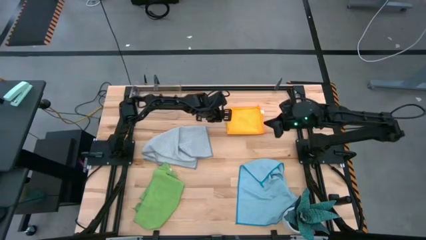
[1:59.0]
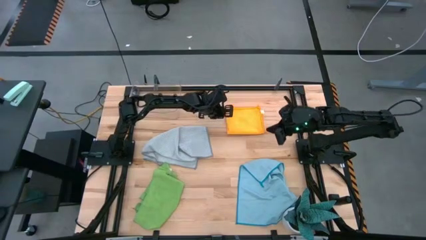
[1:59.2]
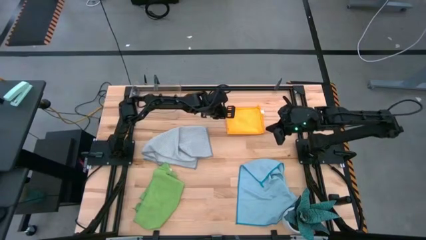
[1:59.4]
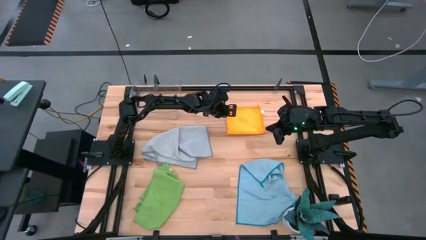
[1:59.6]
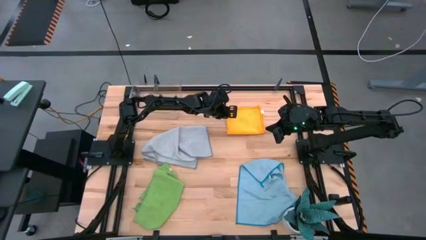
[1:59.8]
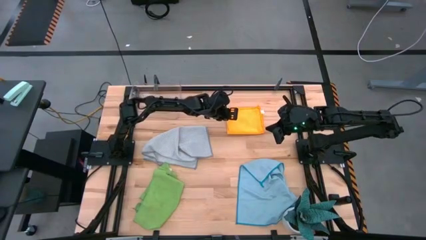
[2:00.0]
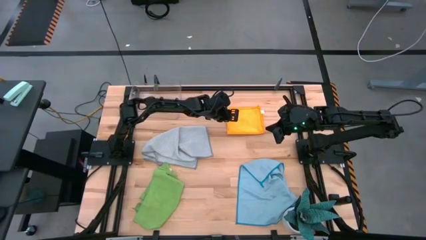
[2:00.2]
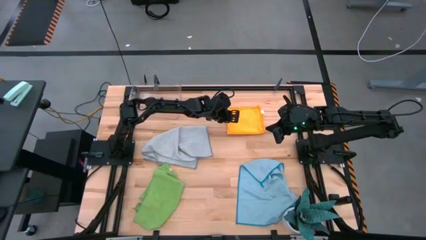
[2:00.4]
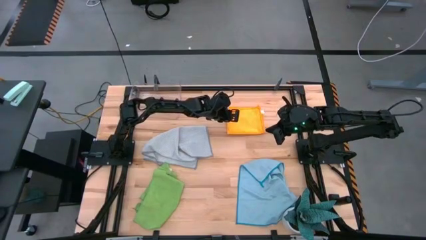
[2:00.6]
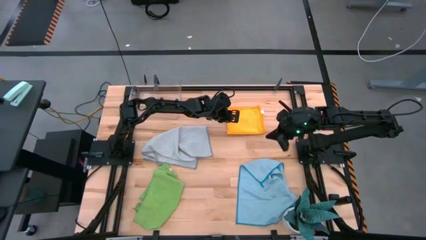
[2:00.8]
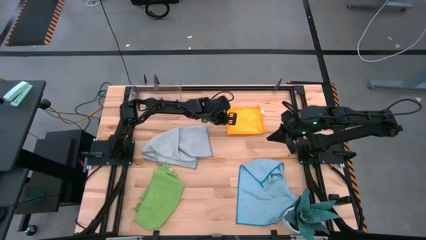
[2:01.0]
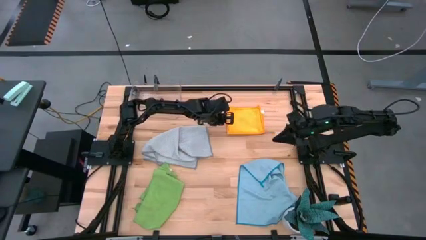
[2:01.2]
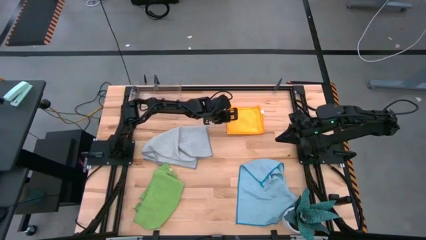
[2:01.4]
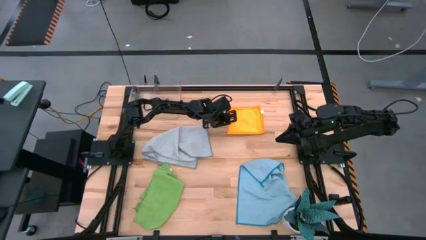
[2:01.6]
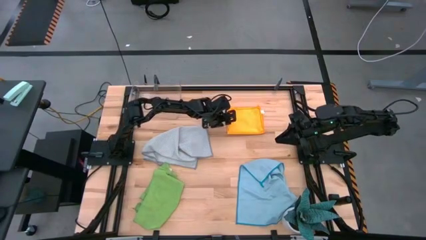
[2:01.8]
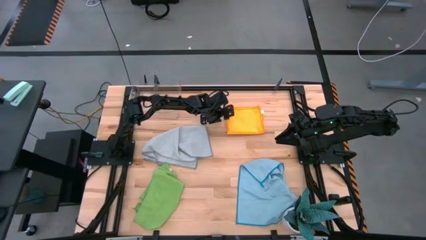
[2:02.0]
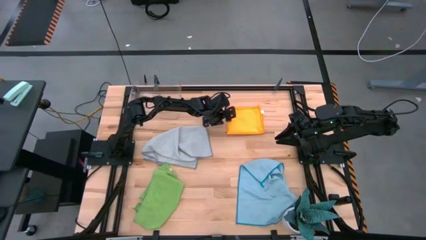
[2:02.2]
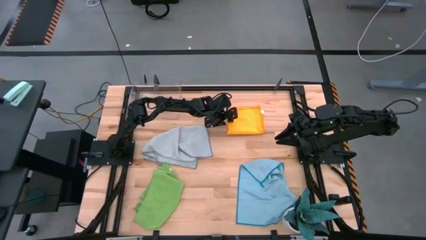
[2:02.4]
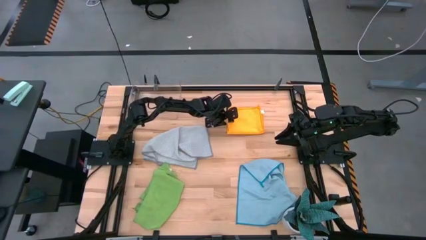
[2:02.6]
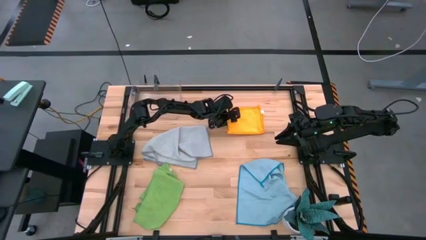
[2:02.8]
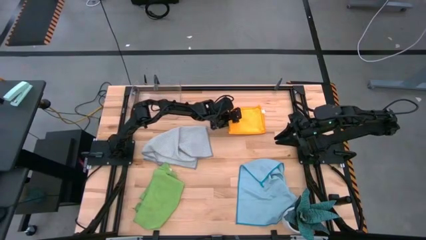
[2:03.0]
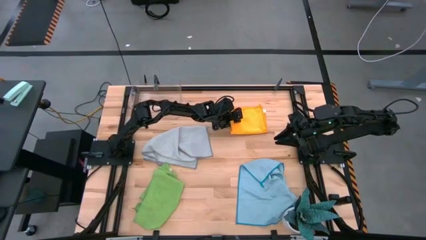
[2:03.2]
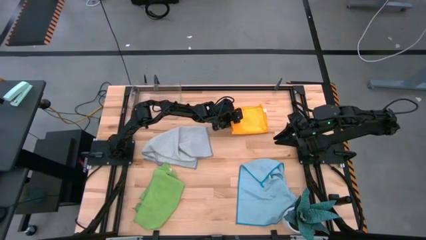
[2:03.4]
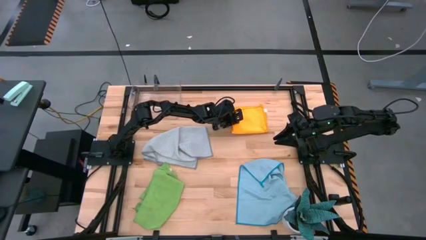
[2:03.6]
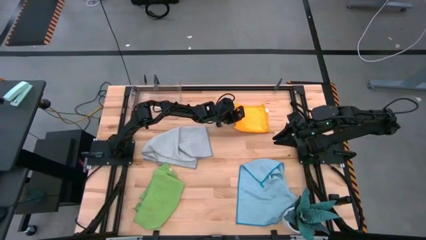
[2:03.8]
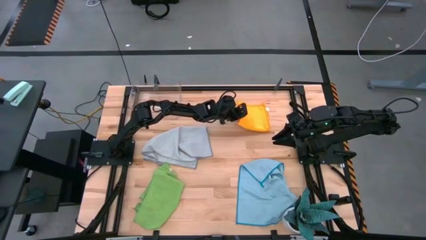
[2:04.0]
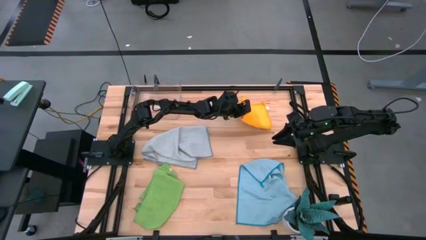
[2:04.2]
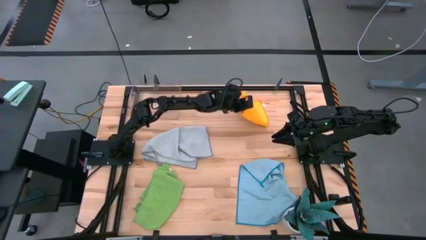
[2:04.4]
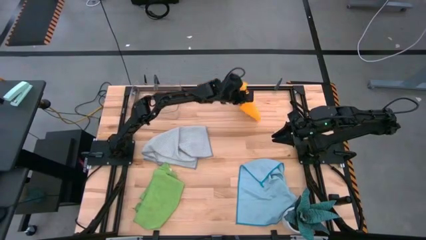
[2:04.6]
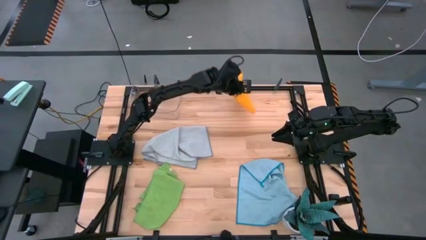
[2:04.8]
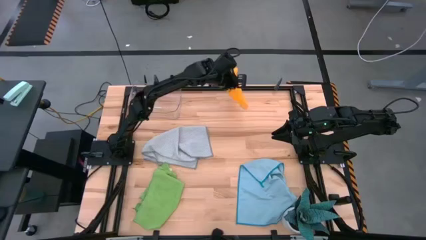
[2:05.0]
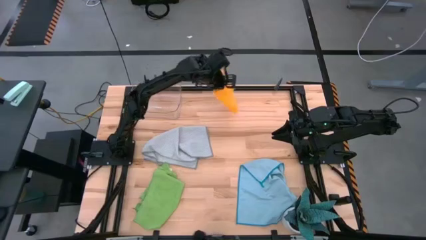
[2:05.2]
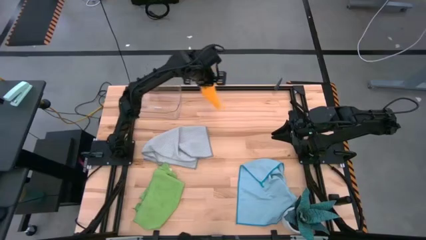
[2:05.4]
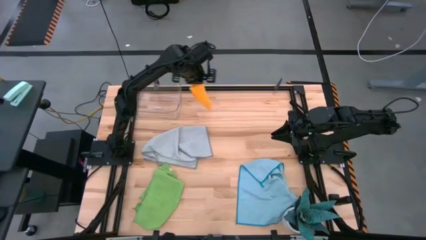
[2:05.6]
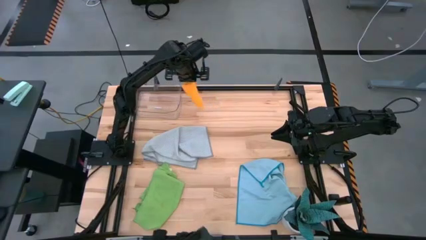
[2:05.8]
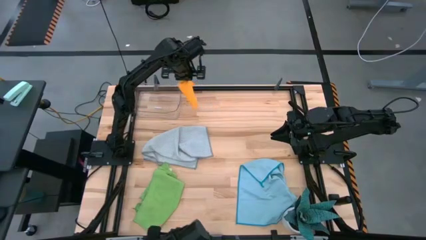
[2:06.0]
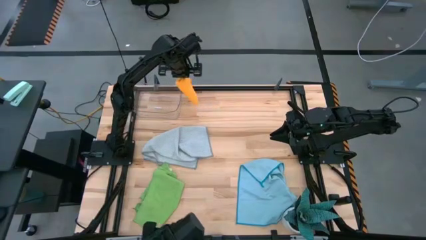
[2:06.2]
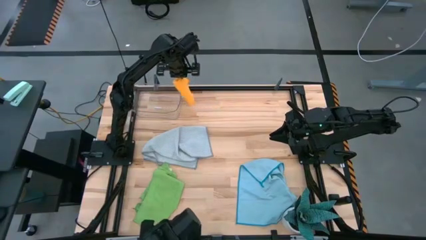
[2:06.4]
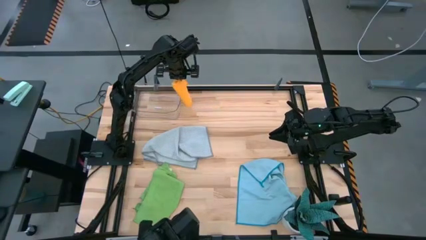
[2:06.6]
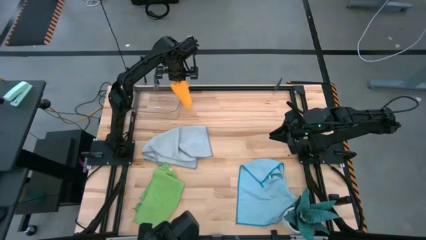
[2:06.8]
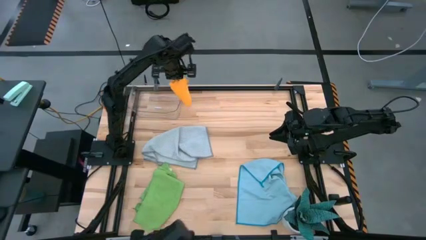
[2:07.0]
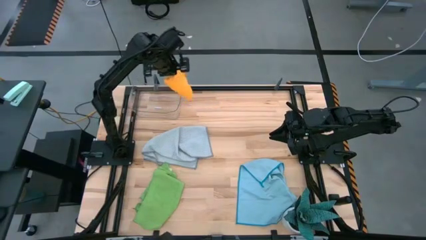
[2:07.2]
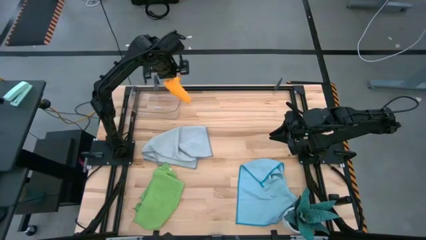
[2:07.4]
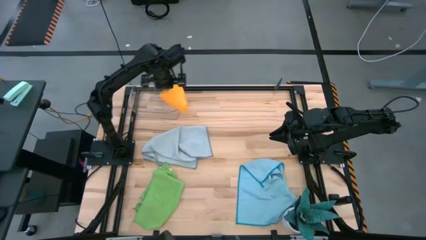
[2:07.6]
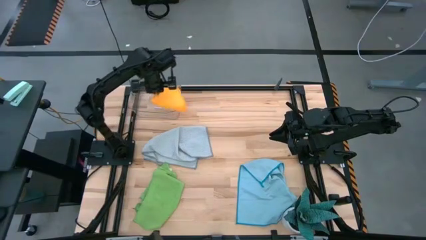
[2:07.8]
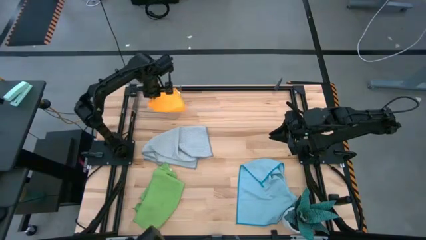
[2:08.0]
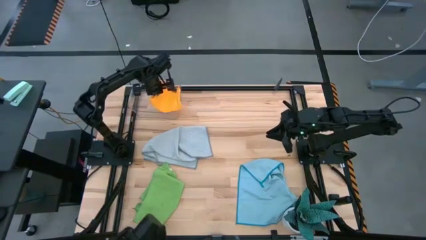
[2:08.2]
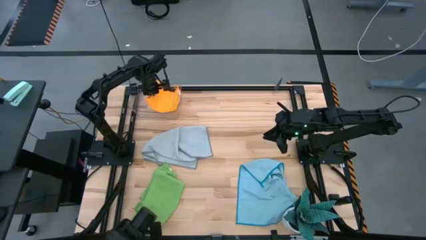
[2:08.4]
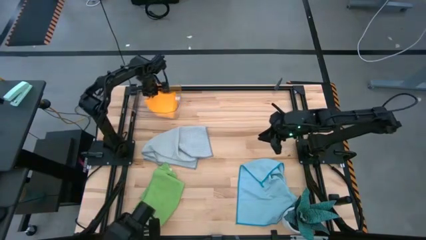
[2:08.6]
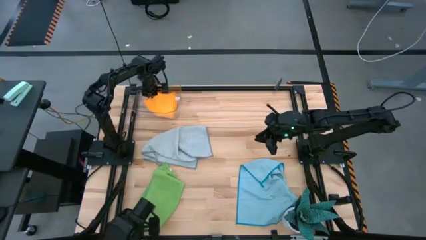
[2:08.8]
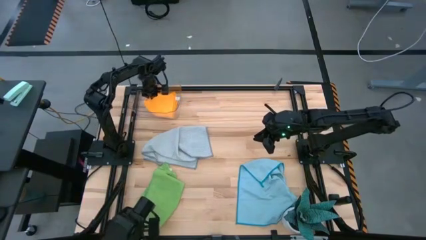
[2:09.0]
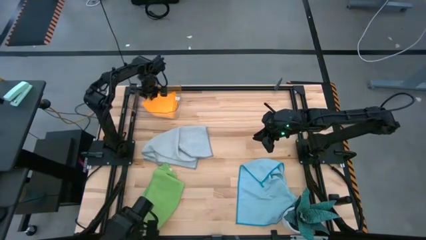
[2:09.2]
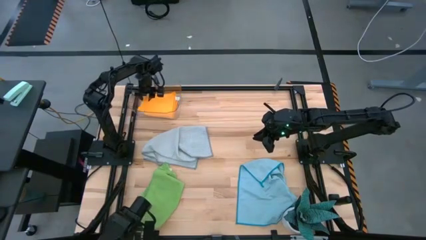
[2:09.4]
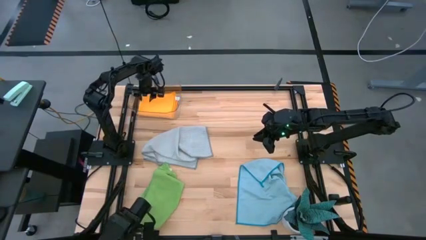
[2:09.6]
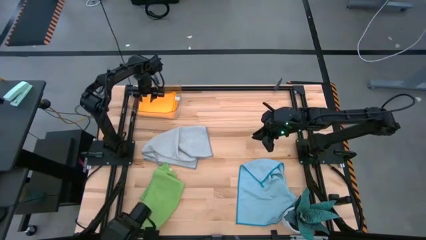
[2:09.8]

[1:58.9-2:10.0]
Task: Fold microfiber towels
Put the orange microfiber cloth into the transparent bin

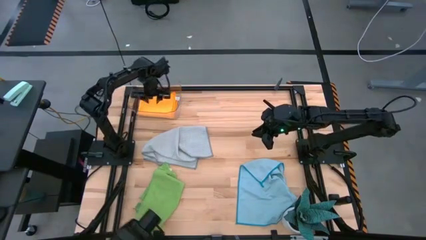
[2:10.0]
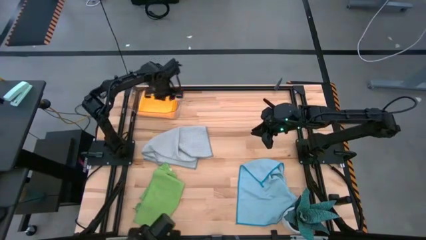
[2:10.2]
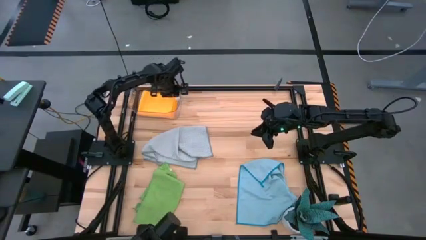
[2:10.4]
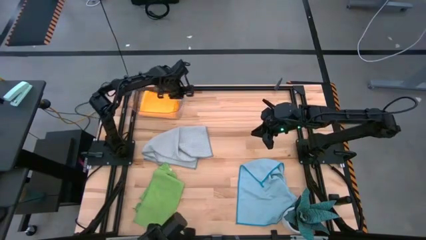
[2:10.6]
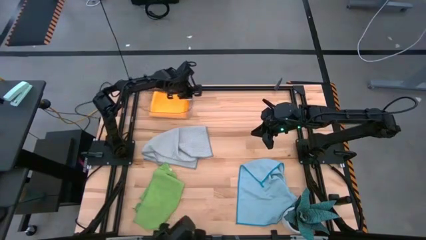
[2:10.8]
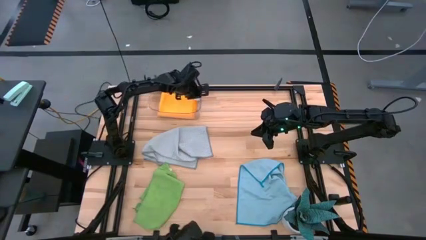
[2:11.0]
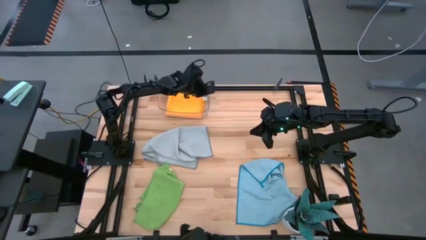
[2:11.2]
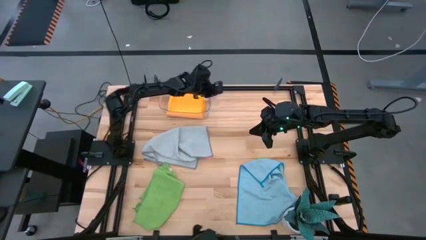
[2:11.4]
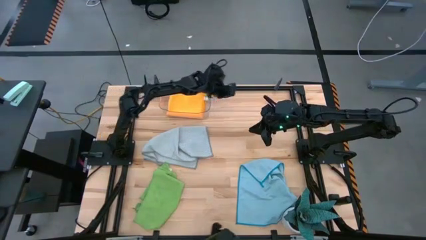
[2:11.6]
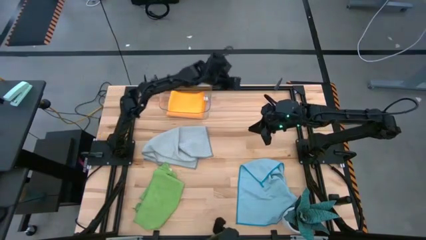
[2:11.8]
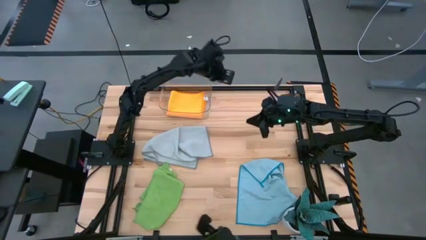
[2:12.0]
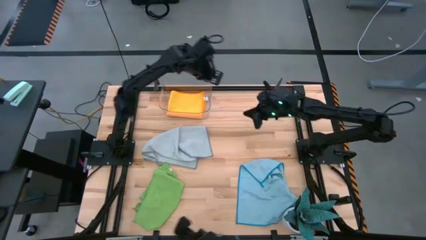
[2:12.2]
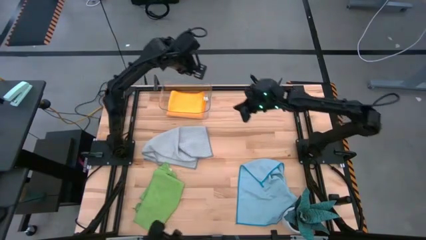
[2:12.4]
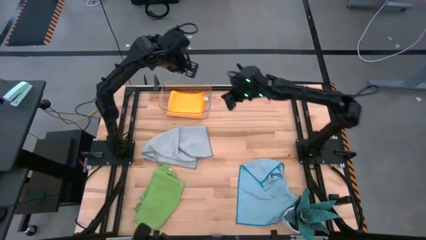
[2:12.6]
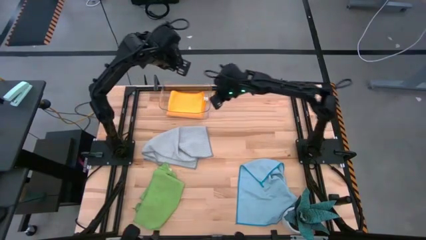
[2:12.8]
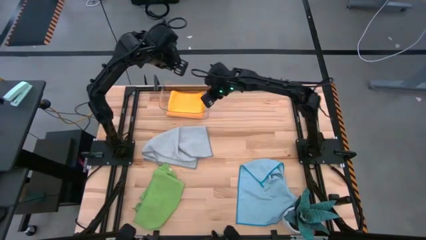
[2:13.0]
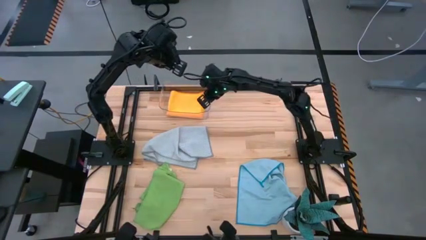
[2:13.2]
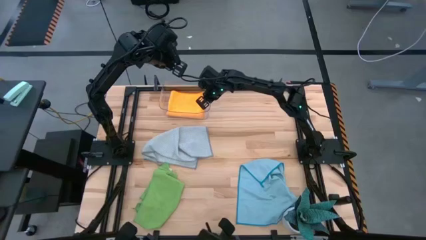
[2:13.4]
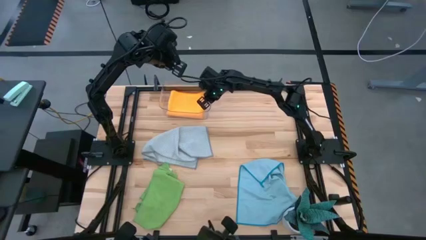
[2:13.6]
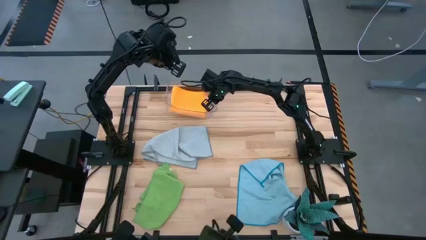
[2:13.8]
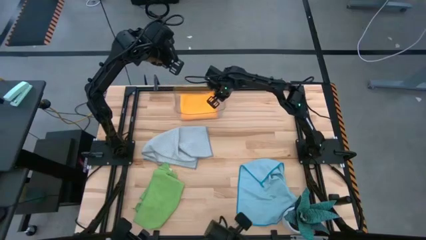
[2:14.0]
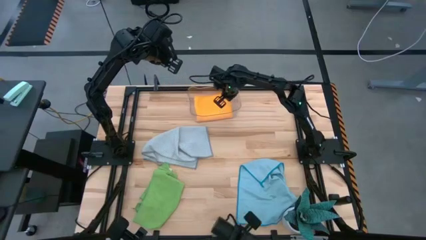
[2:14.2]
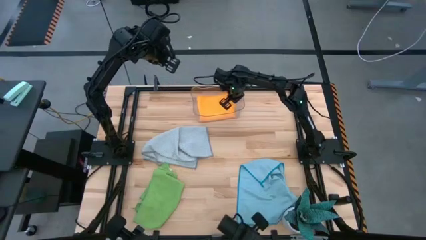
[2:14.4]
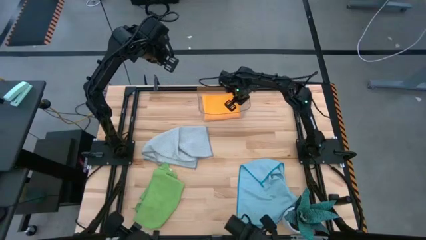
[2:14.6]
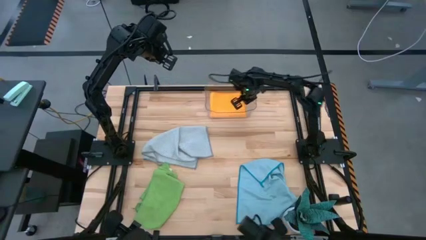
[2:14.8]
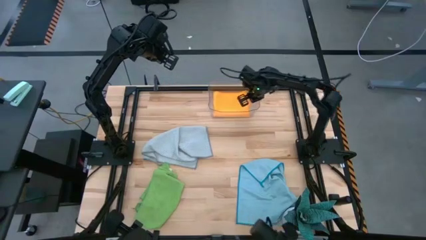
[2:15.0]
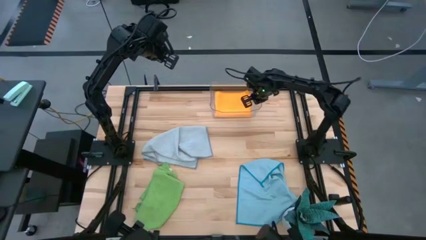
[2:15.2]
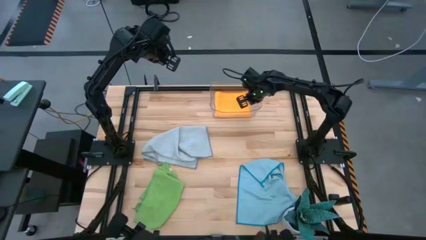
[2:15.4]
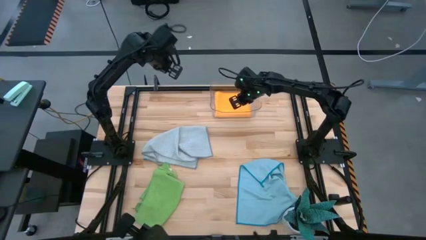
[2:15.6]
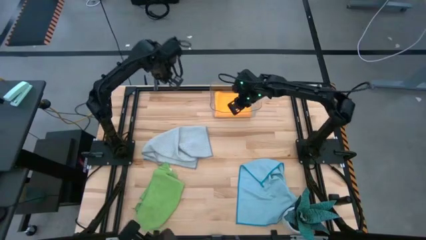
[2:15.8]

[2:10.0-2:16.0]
Move the transparent bin to the top right of the table
